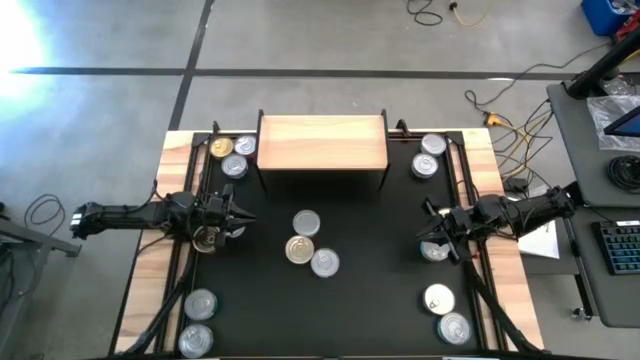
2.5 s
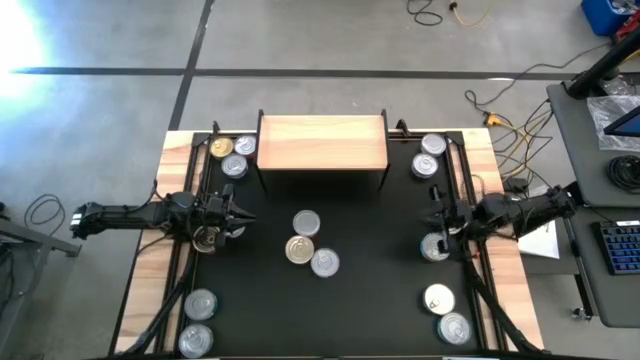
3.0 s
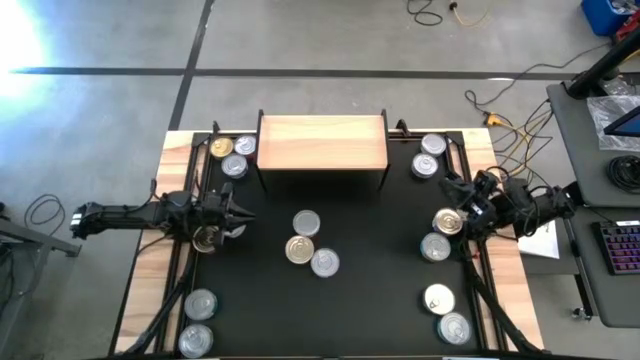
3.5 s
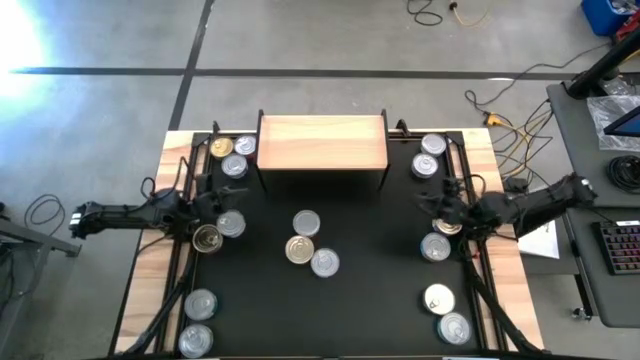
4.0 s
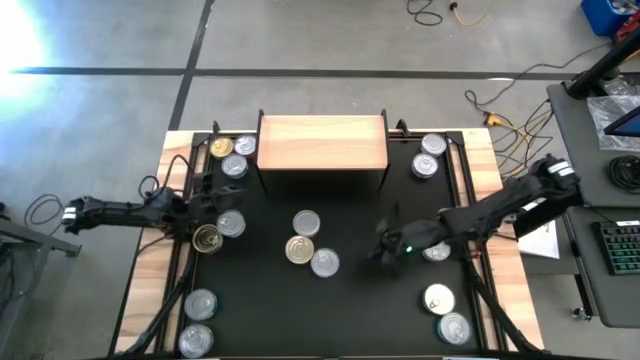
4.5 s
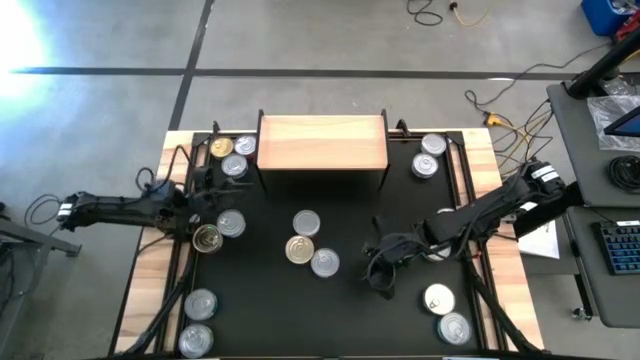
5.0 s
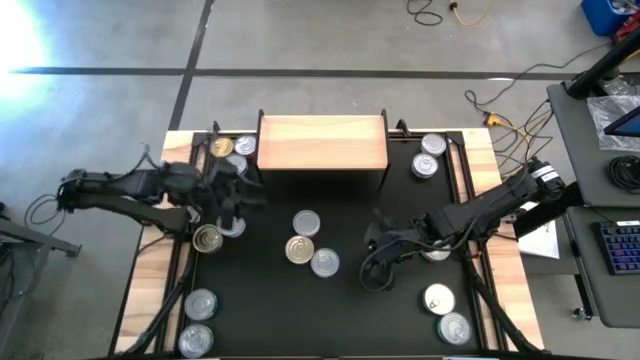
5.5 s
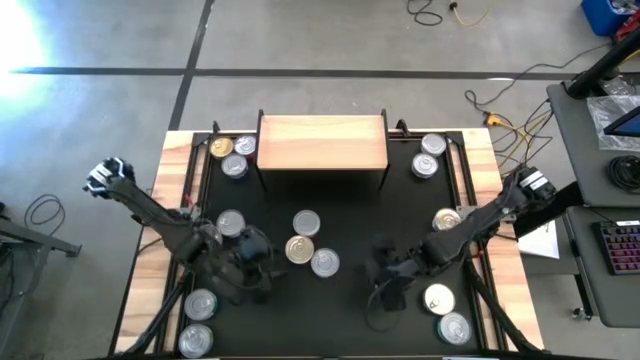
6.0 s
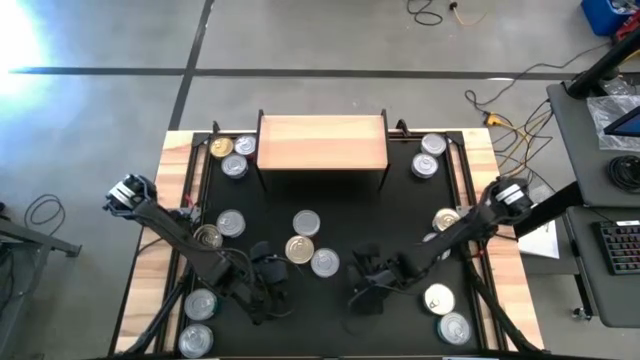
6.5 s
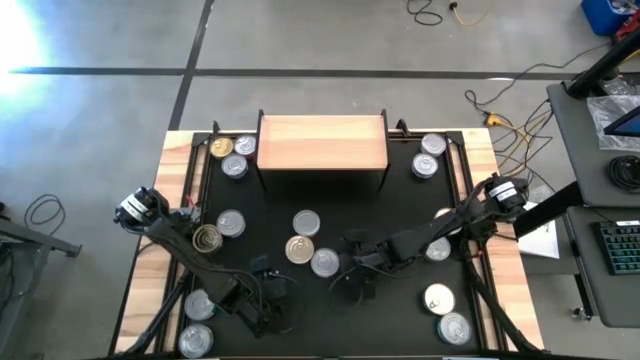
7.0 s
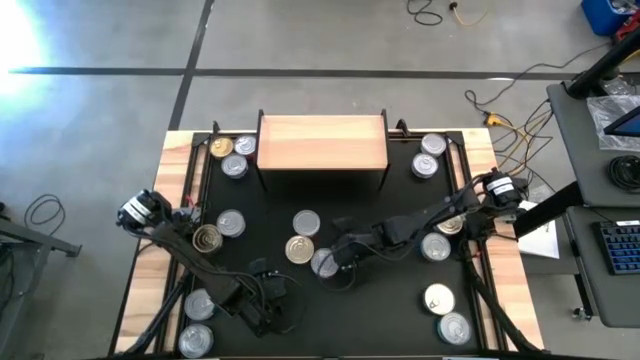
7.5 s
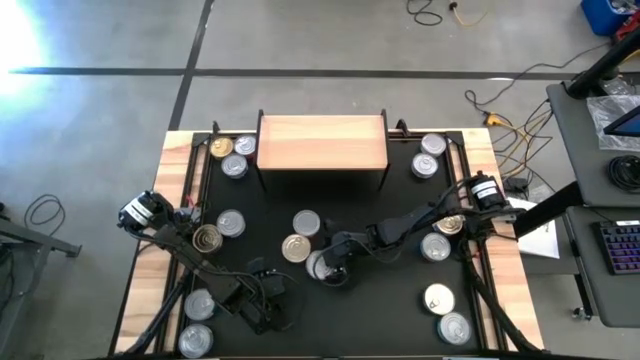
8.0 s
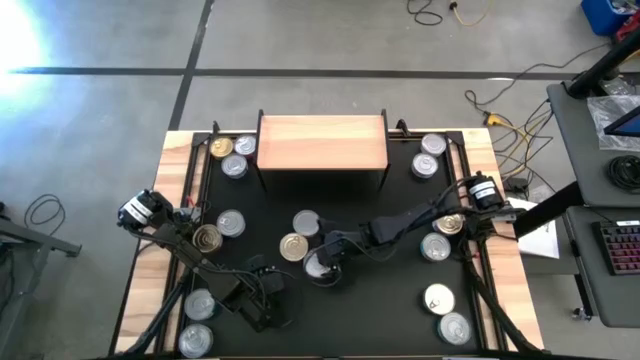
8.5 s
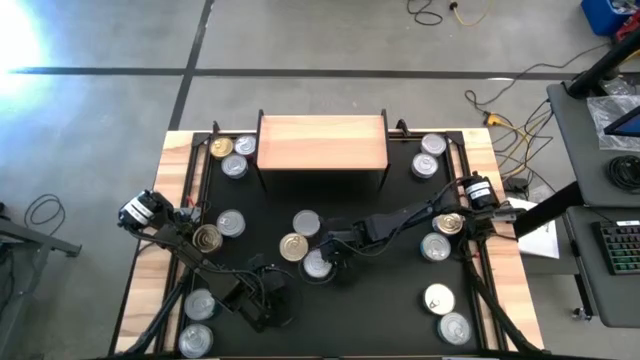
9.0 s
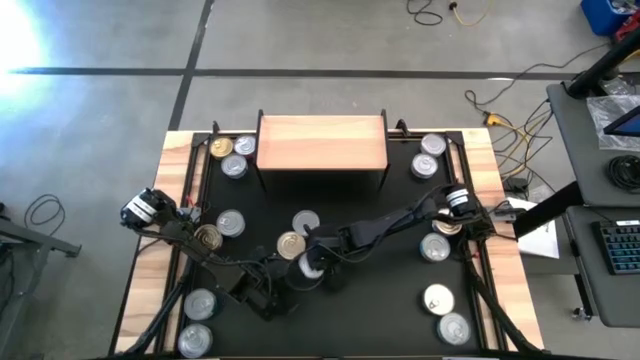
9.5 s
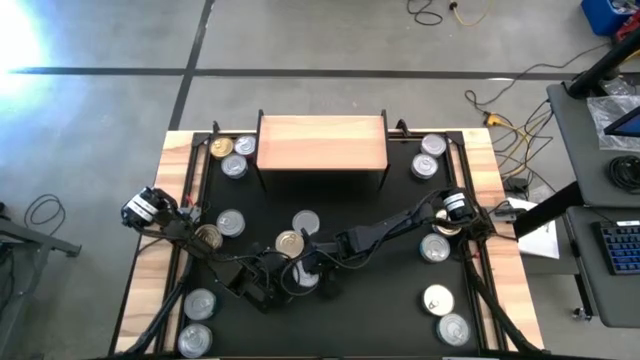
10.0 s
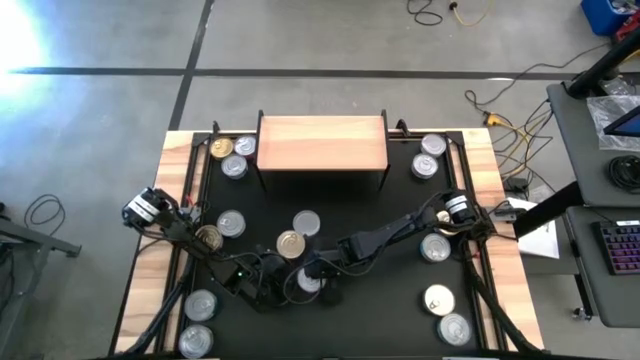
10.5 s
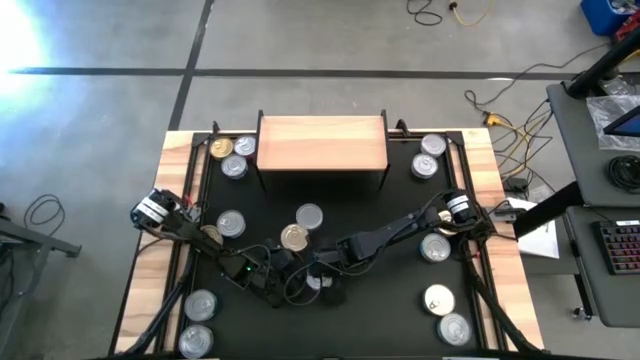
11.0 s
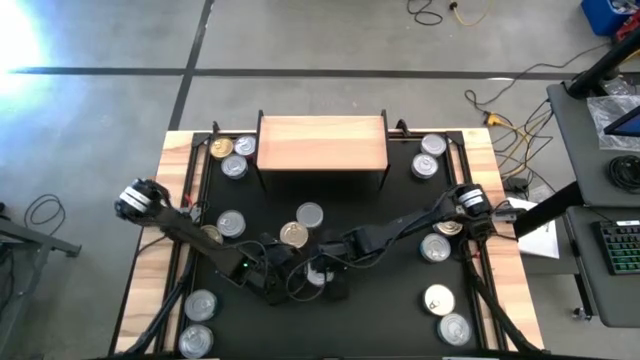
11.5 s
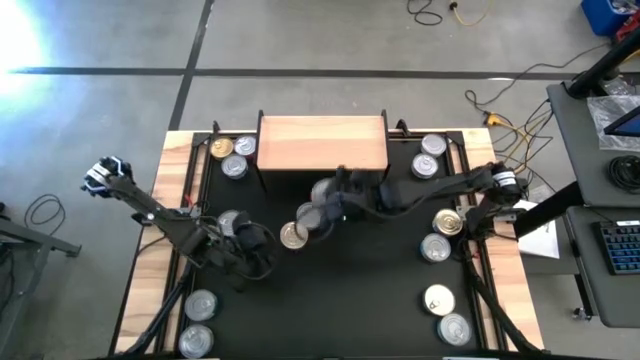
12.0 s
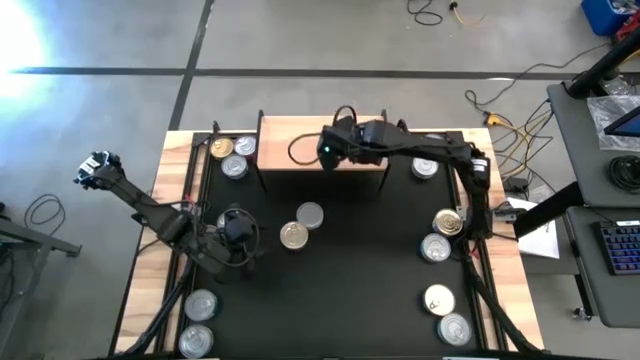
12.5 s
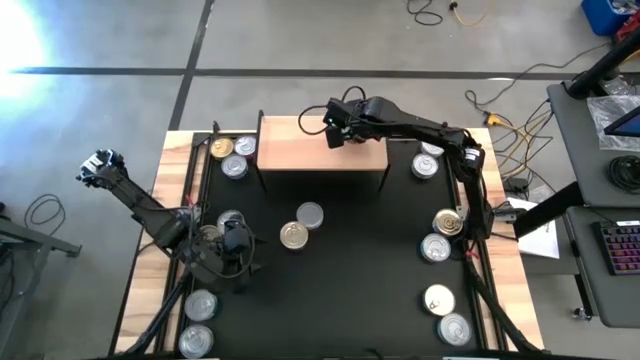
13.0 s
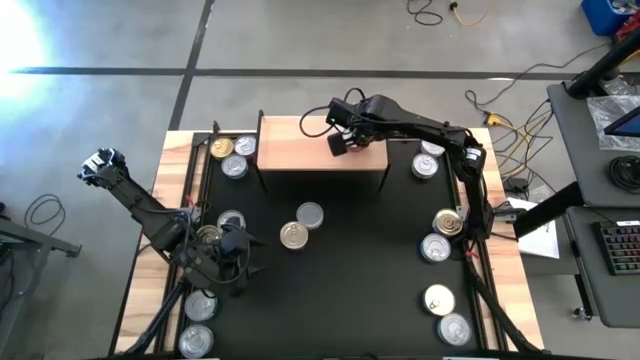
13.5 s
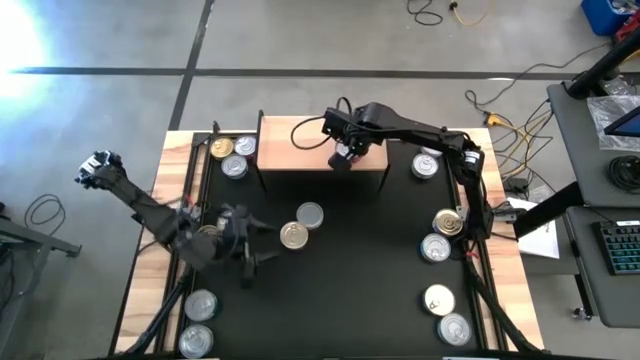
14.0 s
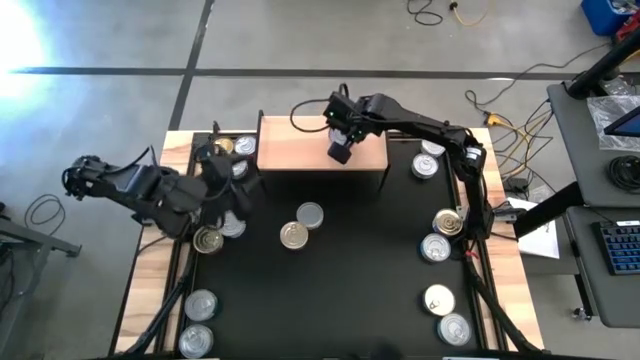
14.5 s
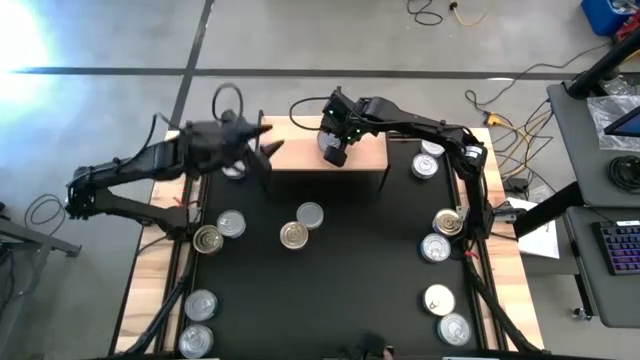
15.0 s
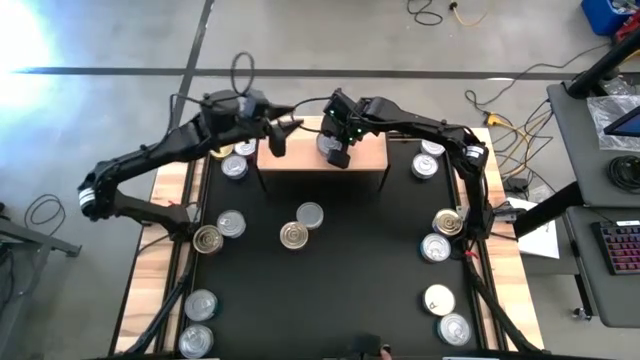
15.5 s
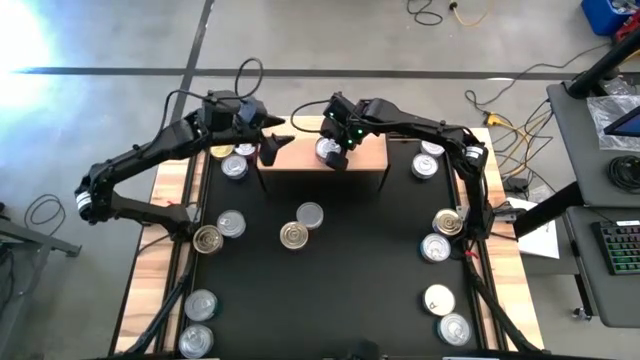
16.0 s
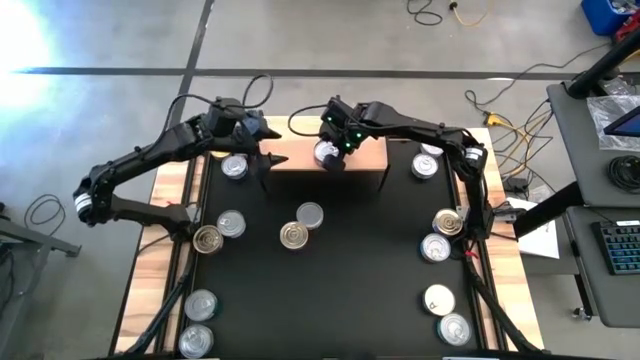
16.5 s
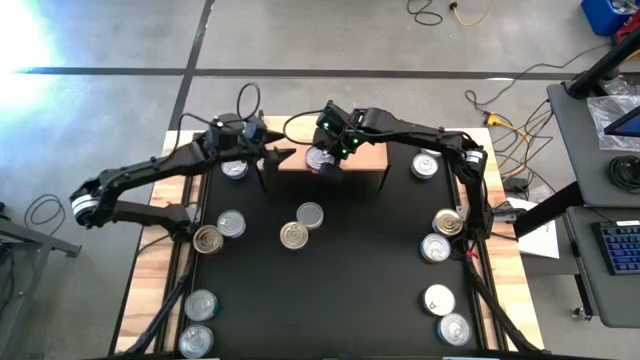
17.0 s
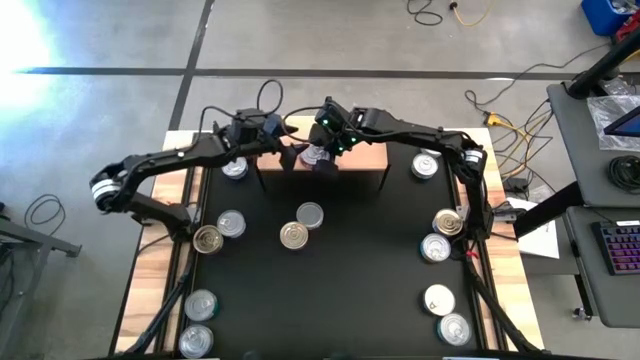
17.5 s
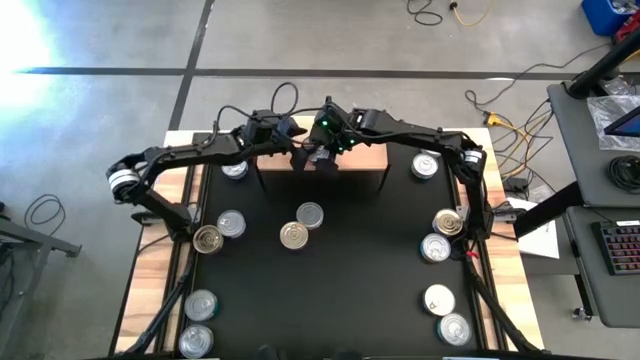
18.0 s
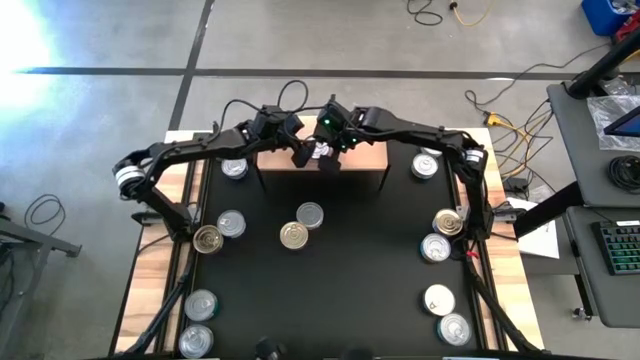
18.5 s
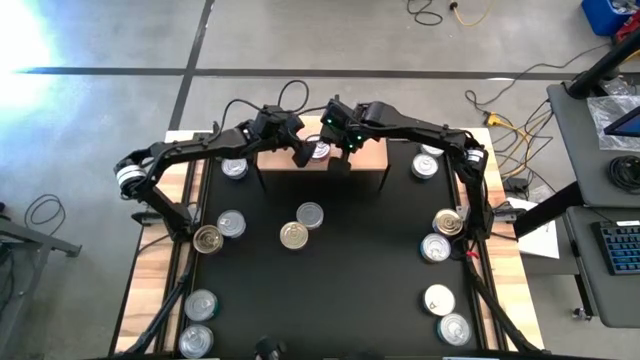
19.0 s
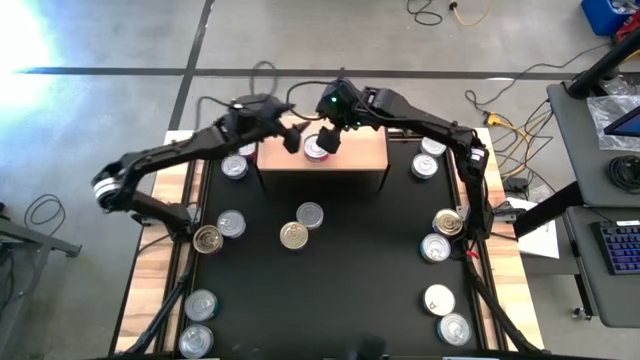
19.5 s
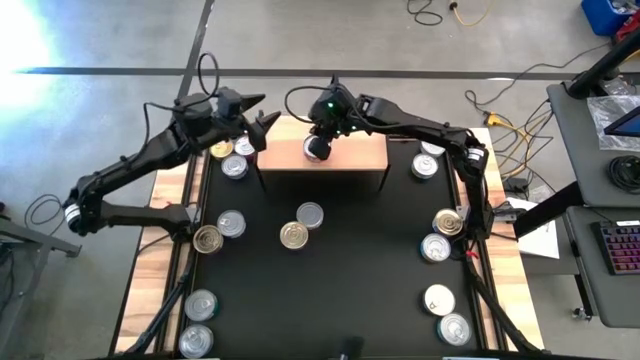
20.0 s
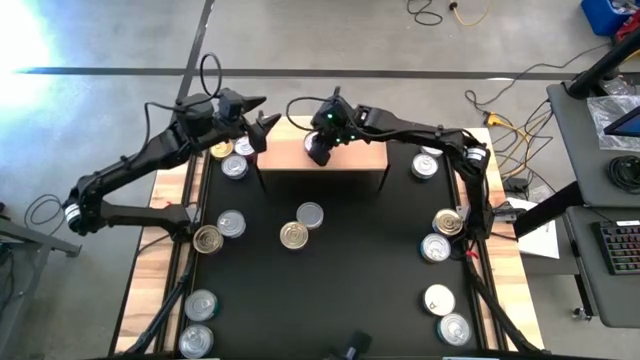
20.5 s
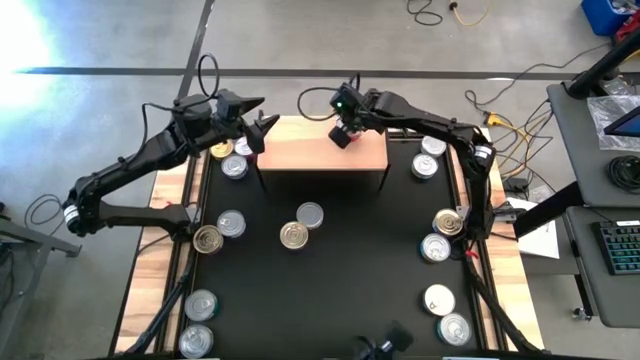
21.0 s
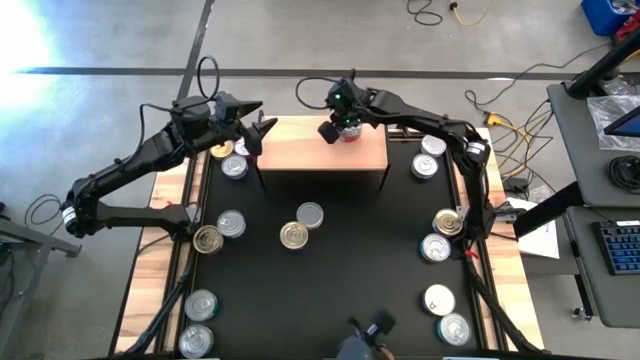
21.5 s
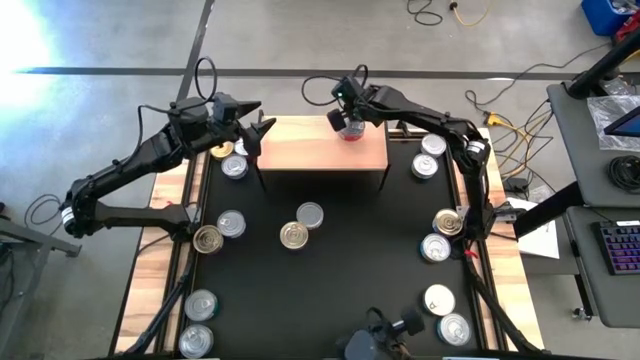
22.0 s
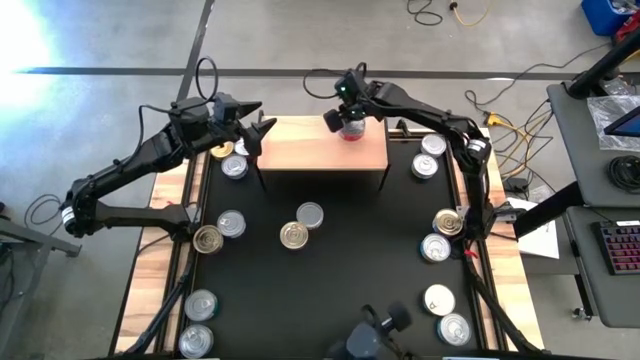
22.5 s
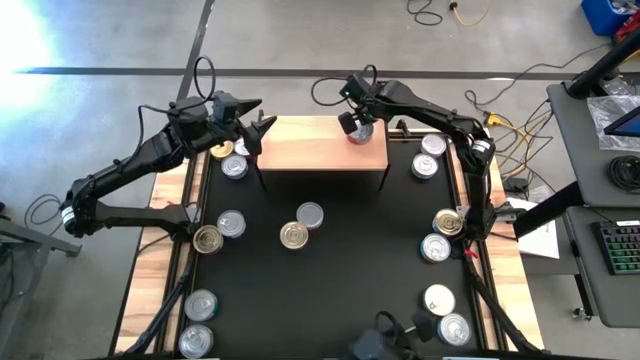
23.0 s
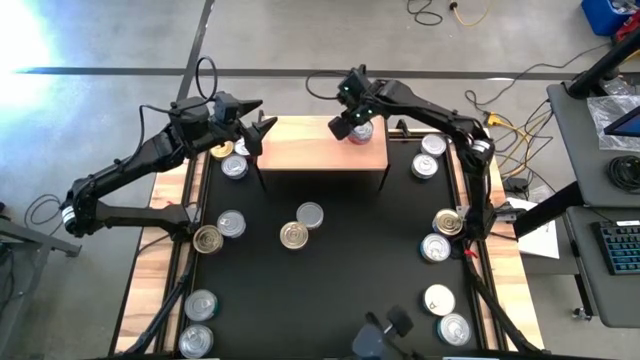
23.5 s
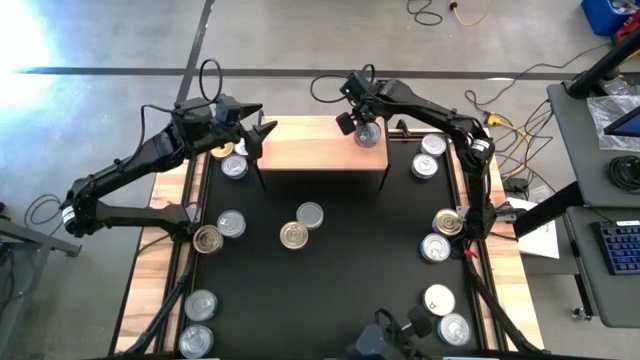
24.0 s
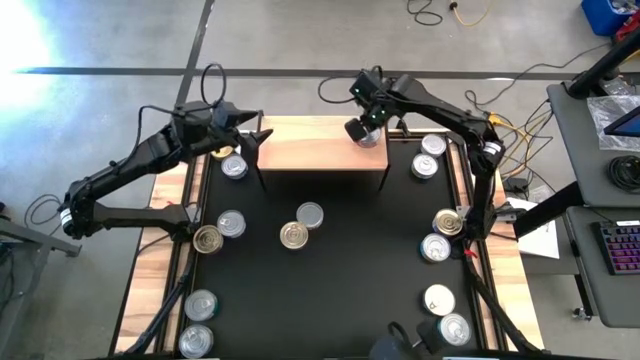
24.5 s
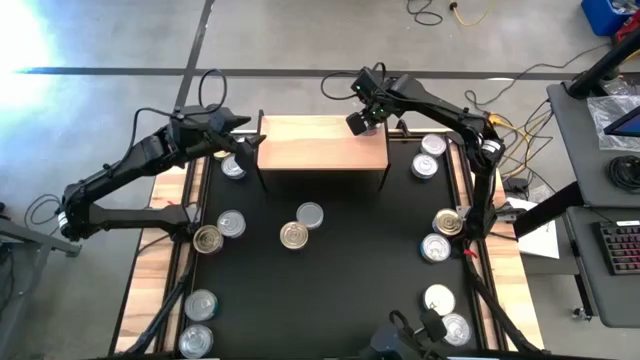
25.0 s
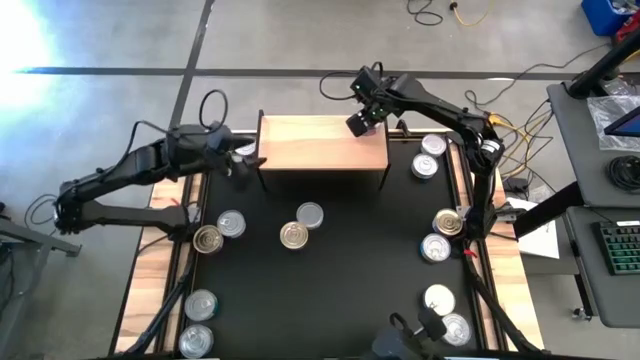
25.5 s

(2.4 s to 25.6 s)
Task: Stack canned seafood by type on shelf
Put the red tuna can on the shelf
